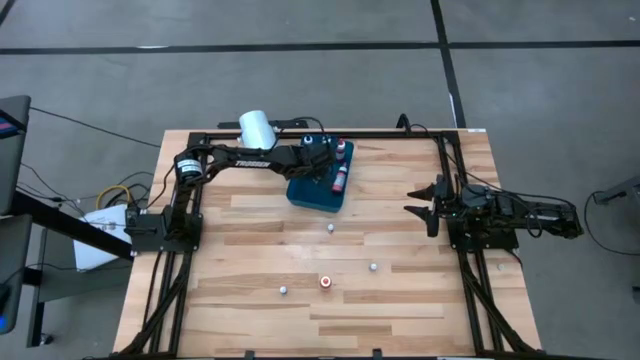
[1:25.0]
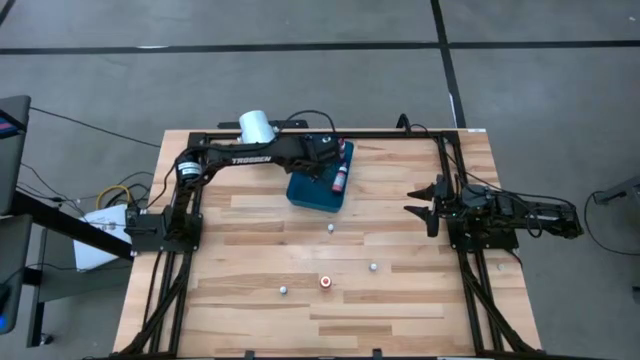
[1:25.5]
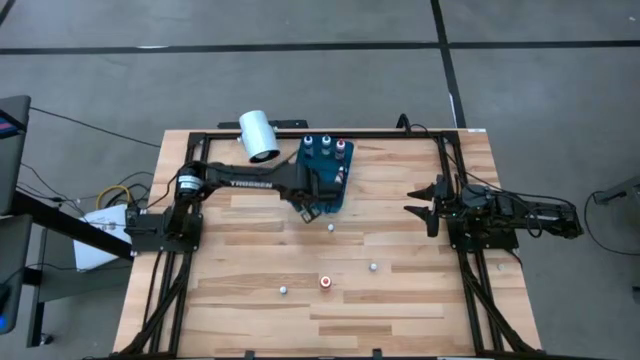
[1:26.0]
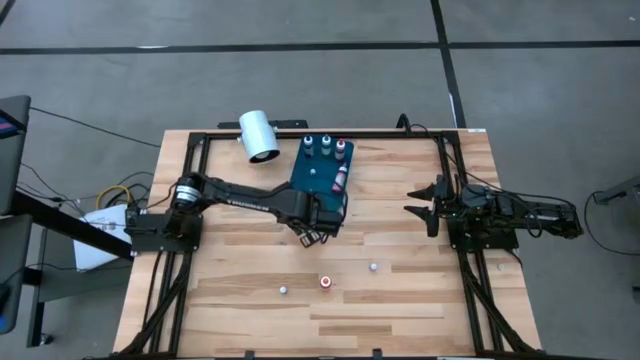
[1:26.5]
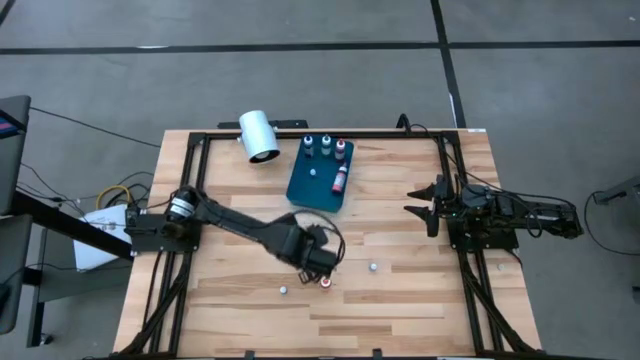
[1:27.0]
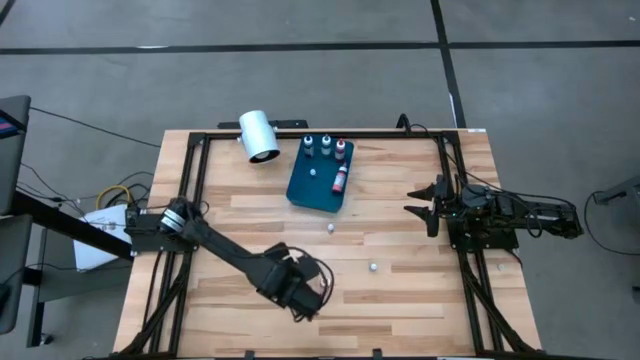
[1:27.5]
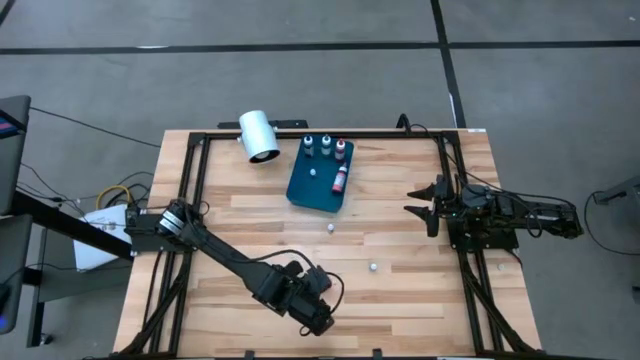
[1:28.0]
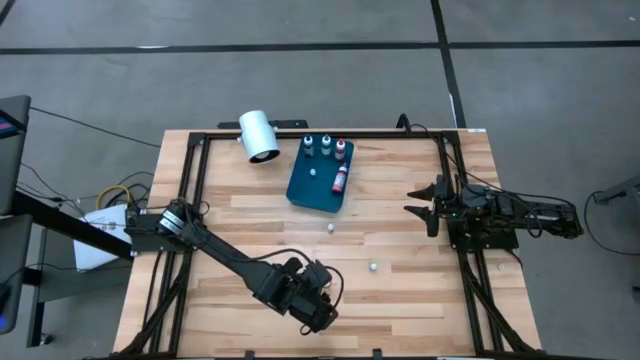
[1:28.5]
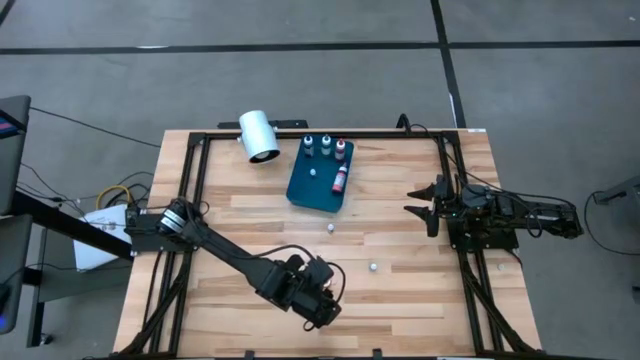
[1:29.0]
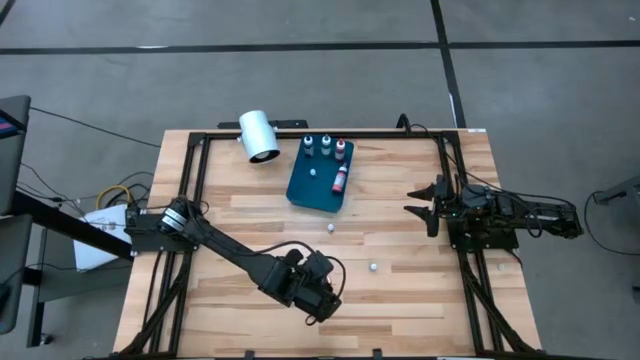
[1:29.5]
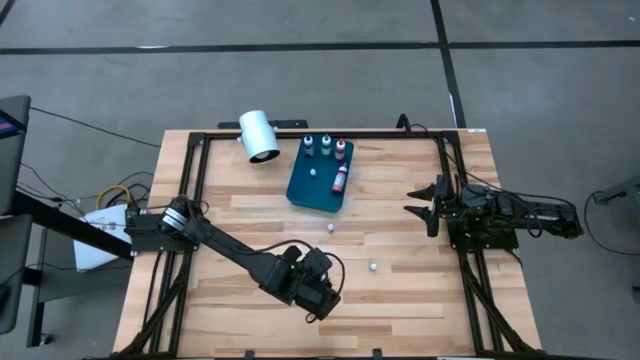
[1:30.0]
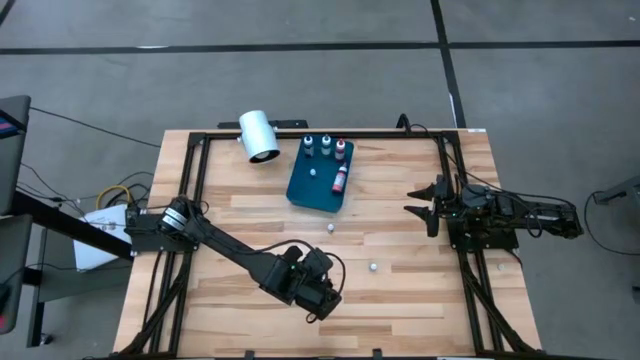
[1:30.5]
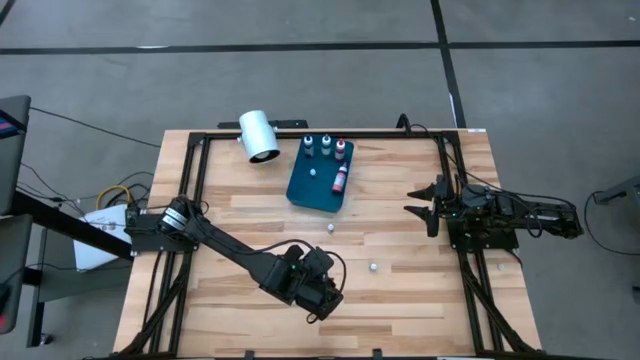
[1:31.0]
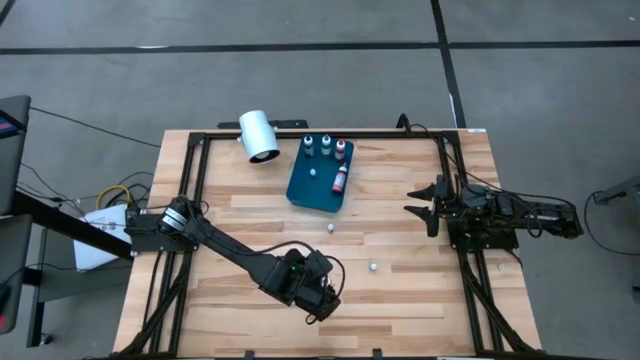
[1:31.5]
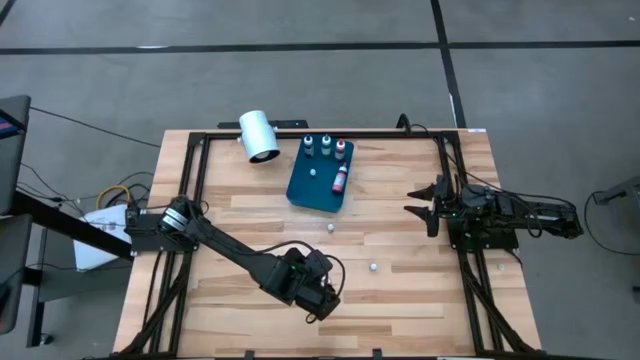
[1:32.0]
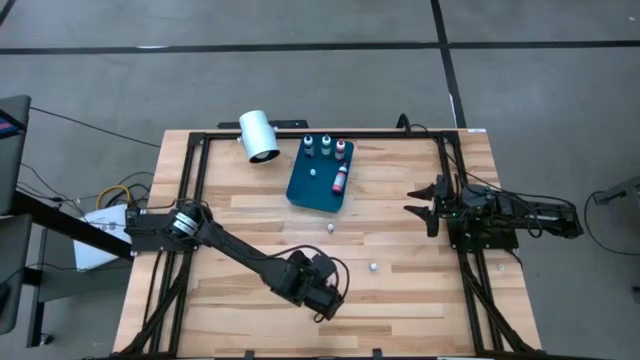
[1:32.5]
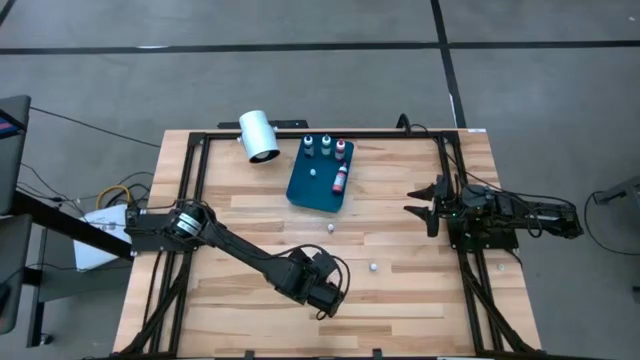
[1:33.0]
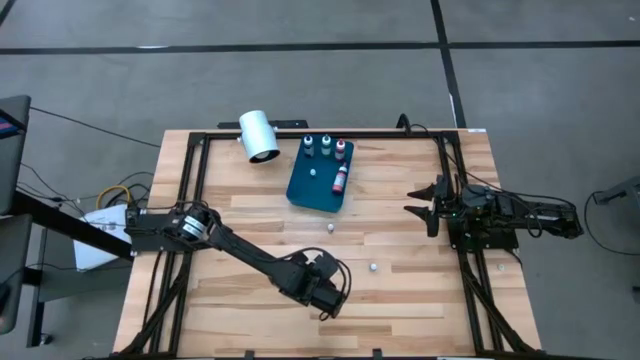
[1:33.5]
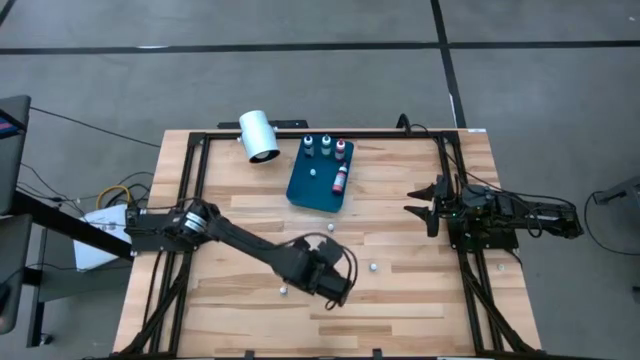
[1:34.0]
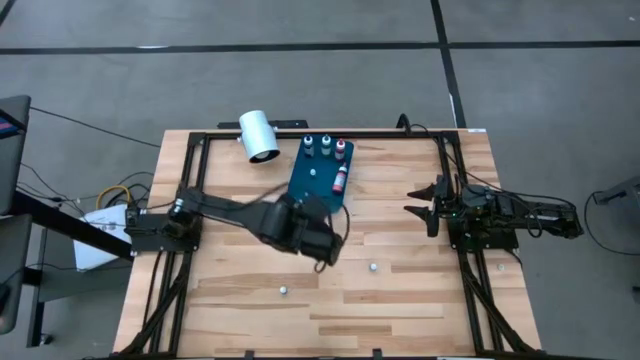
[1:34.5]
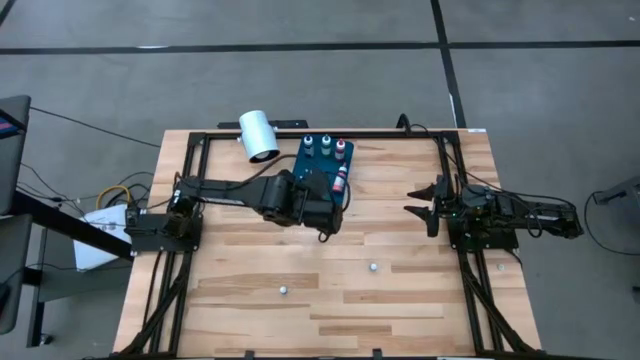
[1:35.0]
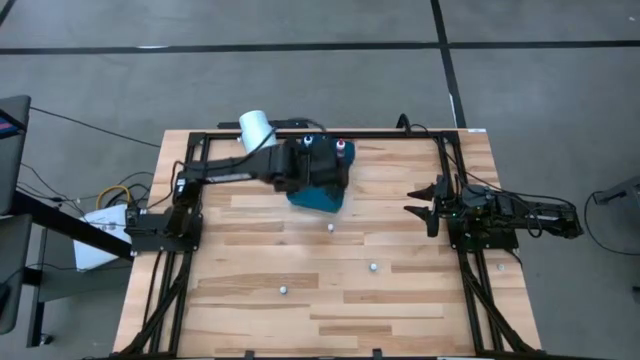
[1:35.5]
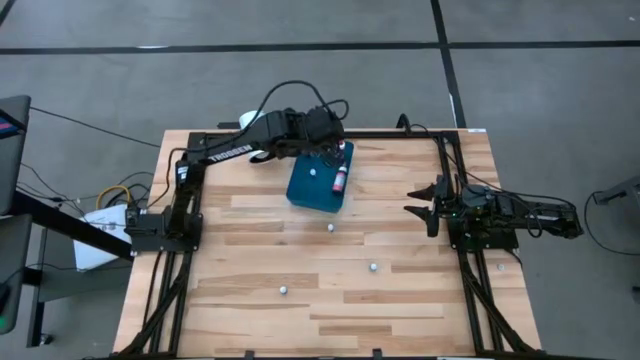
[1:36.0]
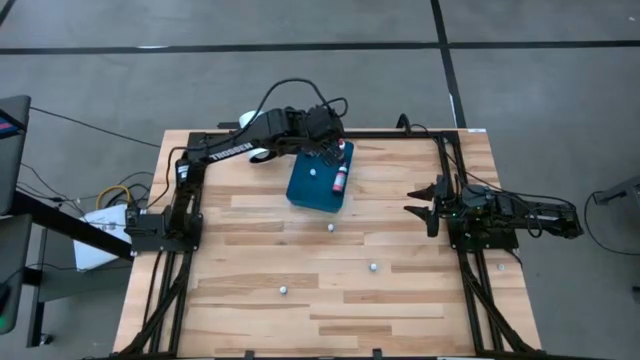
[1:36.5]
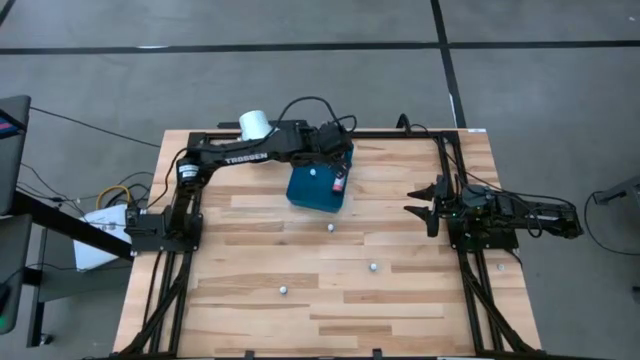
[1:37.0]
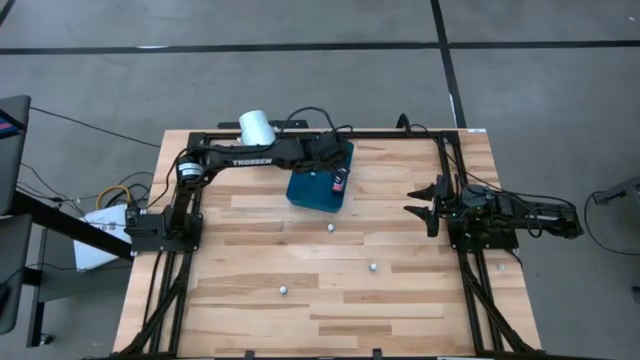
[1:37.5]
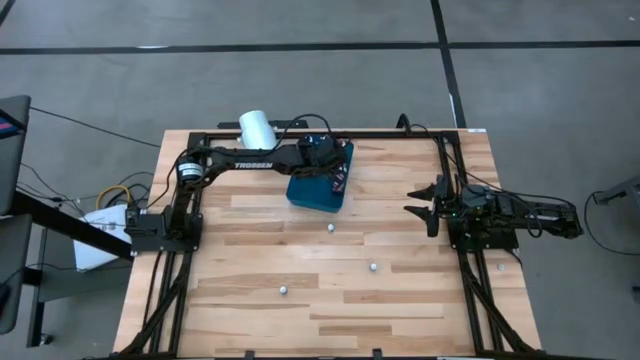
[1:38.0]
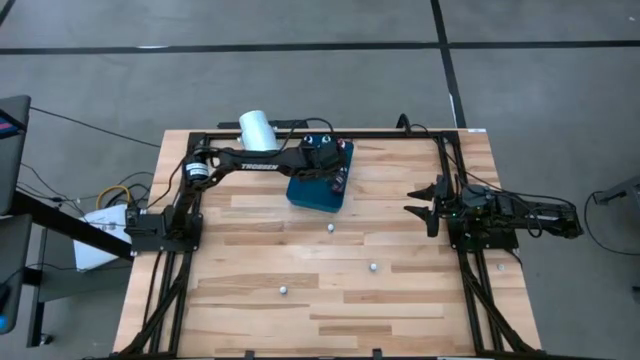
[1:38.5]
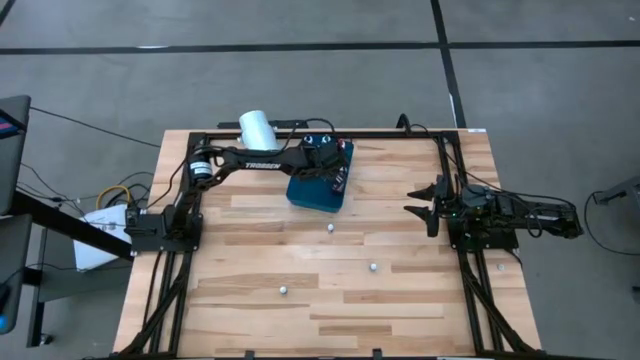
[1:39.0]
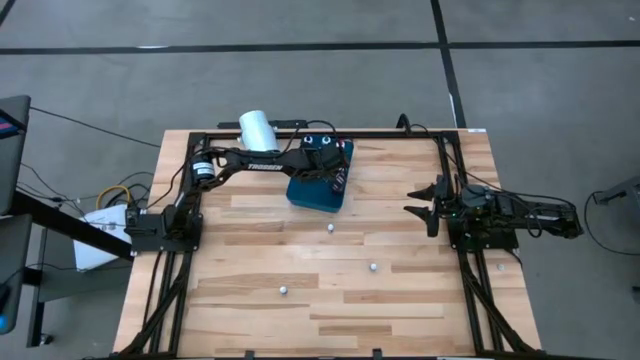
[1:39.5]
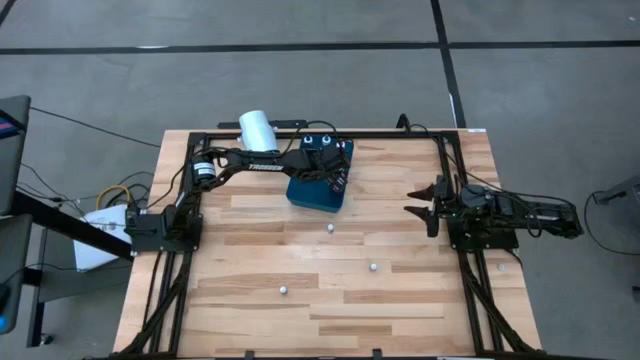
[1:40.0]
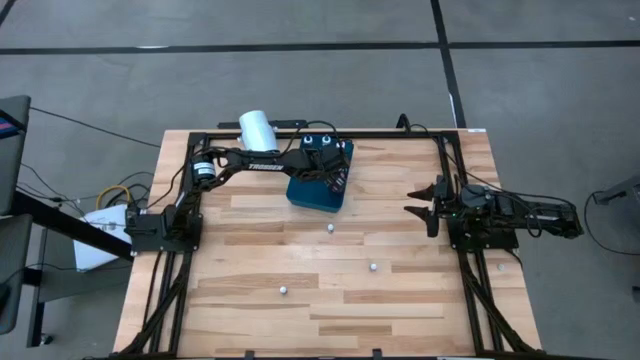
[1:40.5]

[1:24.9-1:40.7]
Task: Pick & Place food coloring
Put the large orange food coloring bottle into the blue bin

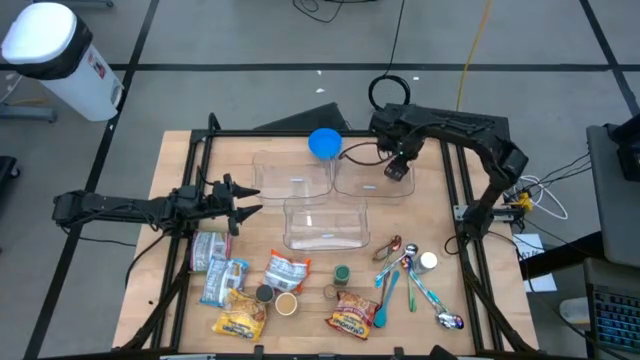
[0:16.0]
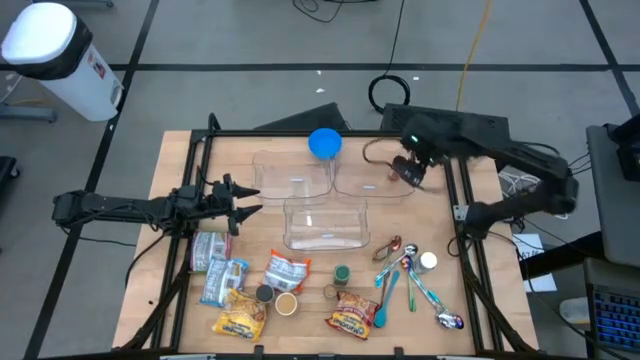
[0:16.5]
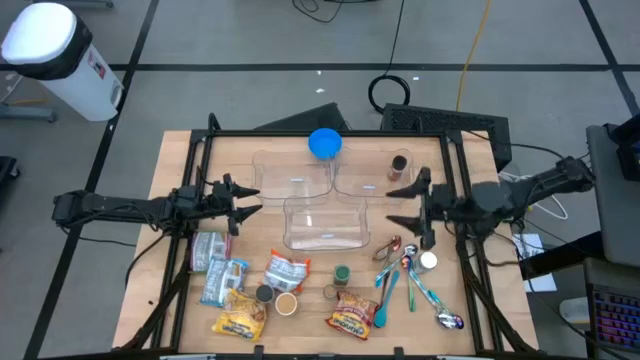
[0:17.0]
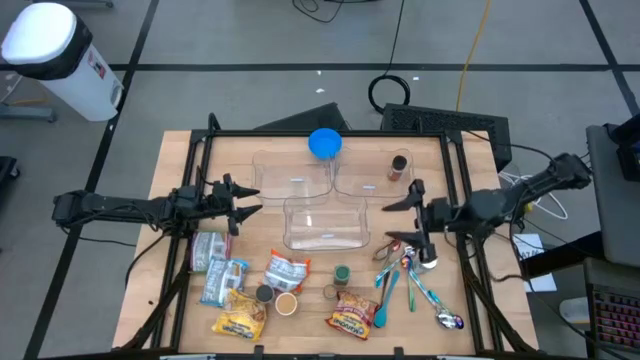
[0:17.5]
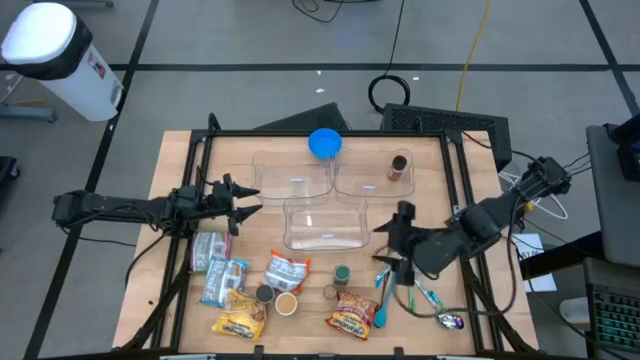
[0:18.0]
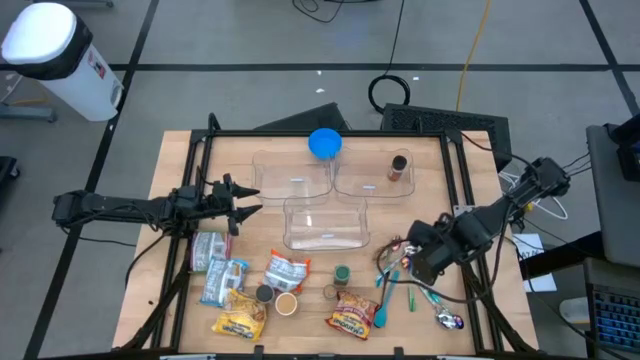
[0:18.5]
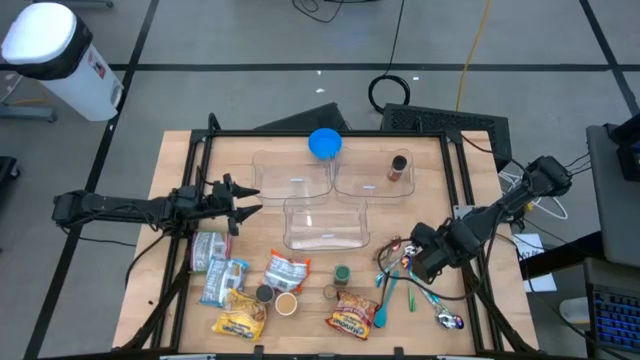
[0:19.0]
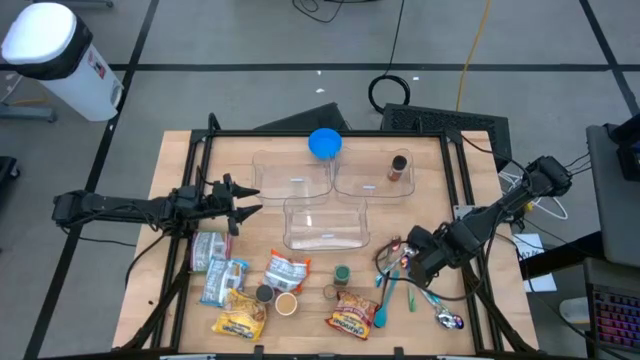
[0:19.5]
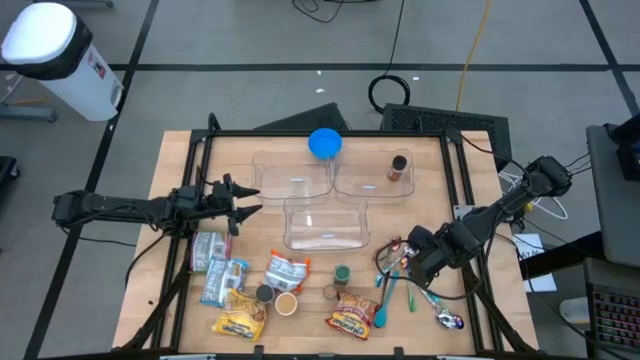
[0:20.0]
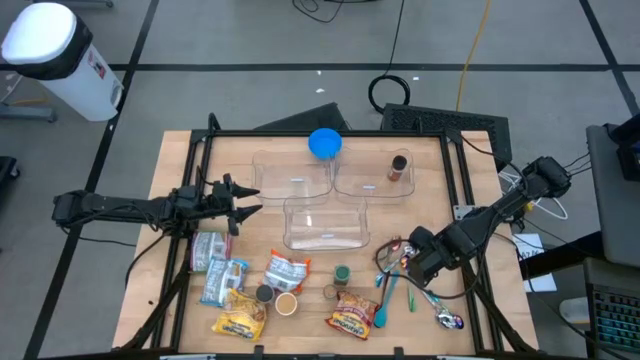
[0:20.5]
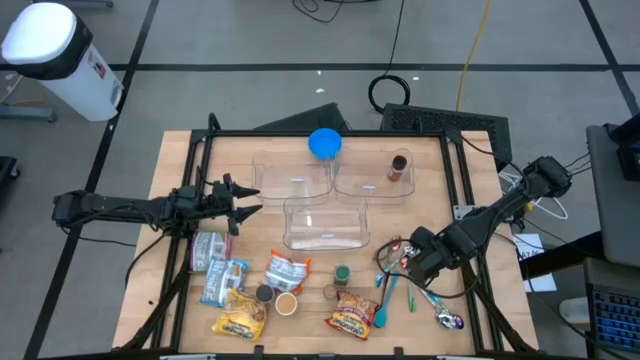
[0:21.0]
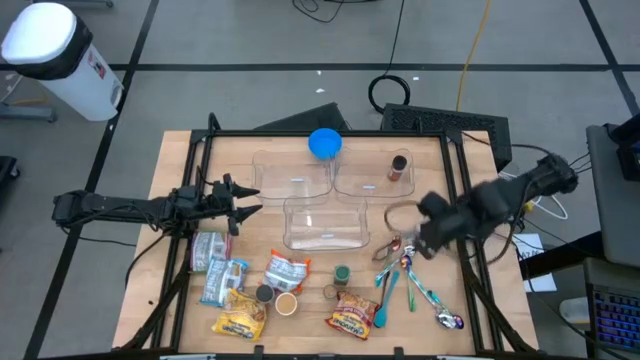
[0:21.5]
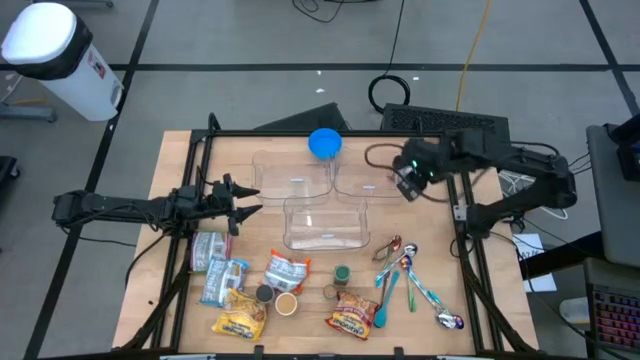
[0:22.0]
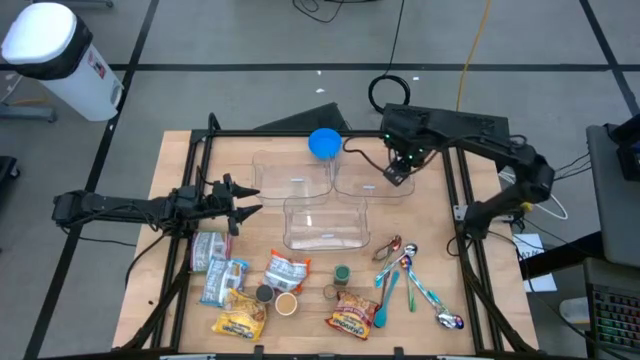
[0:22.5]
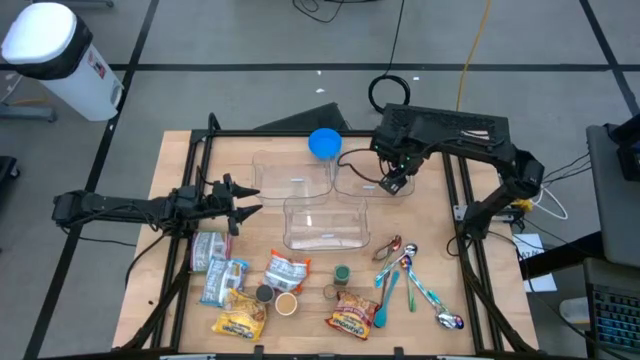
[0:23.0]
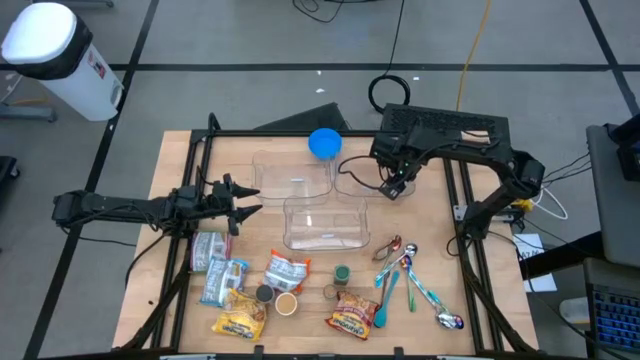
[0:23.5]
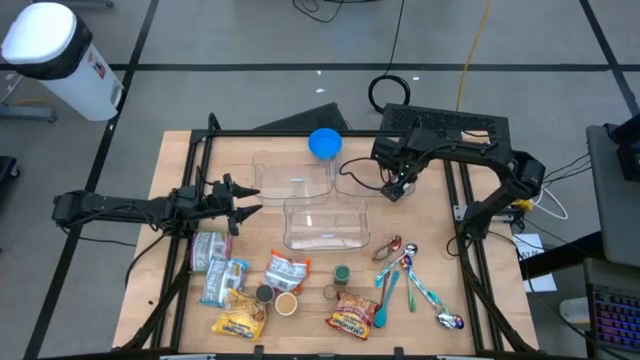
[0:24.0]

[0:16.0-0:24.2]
Task: Pick & Place Food Item
Put the white seasoning bottle into the top right transparent bin
